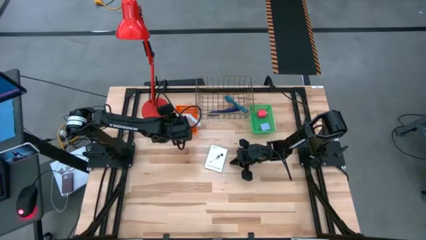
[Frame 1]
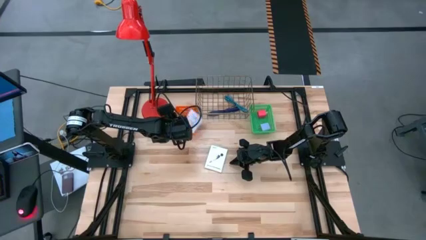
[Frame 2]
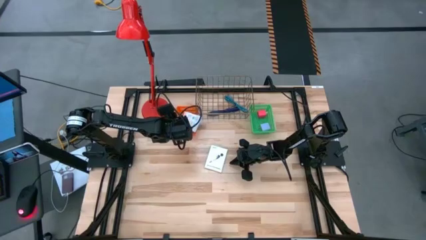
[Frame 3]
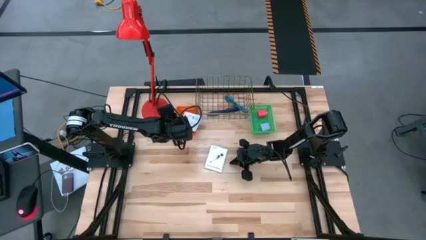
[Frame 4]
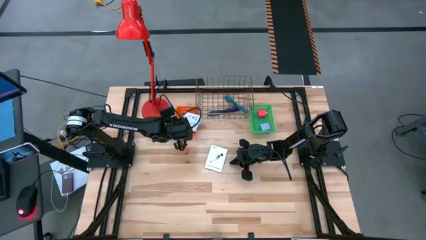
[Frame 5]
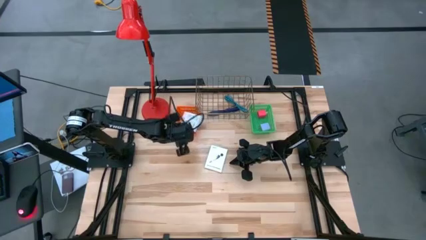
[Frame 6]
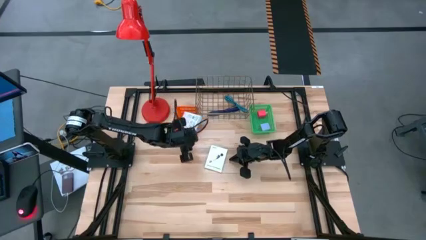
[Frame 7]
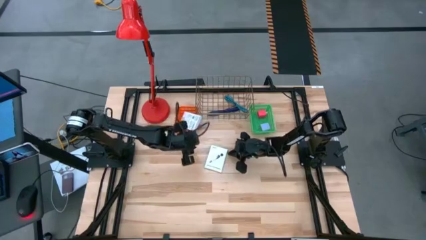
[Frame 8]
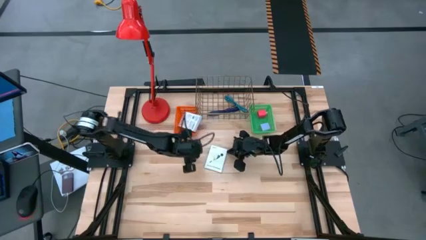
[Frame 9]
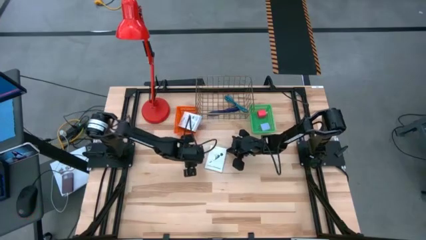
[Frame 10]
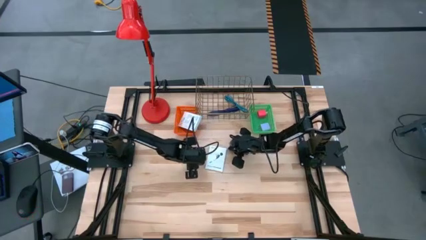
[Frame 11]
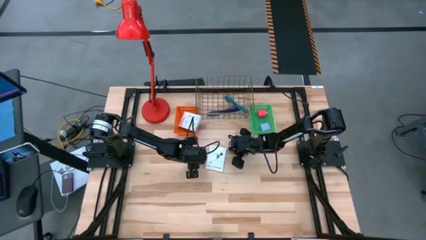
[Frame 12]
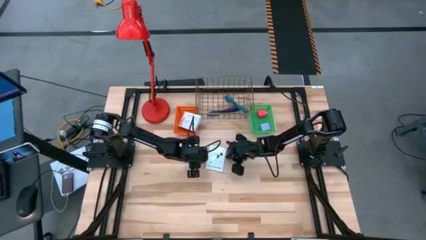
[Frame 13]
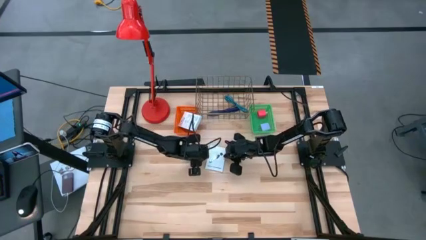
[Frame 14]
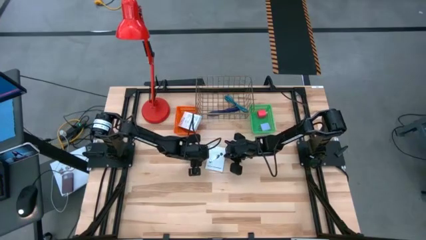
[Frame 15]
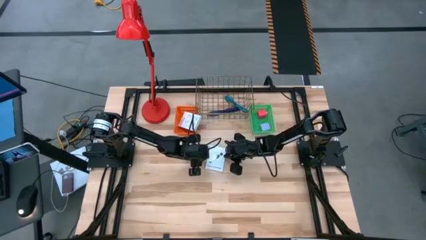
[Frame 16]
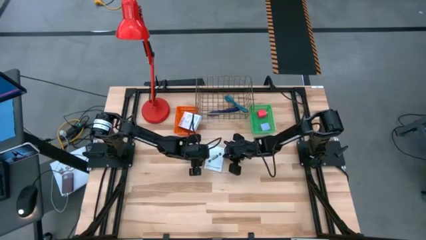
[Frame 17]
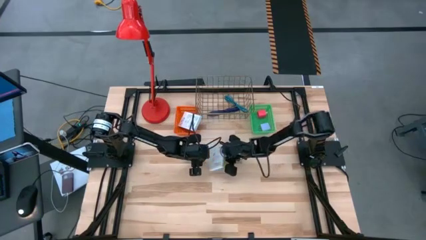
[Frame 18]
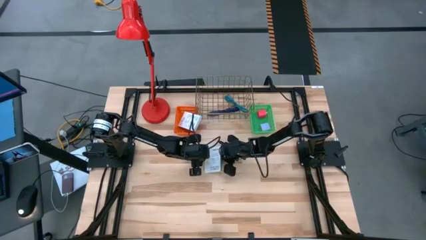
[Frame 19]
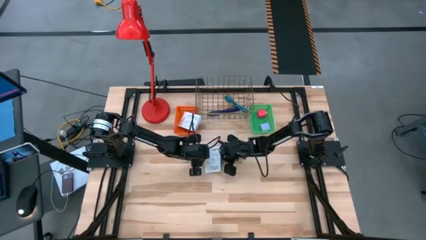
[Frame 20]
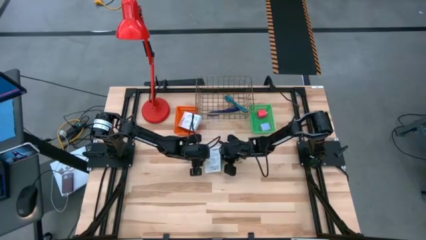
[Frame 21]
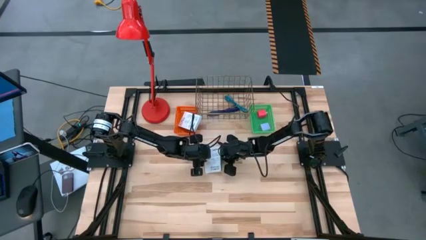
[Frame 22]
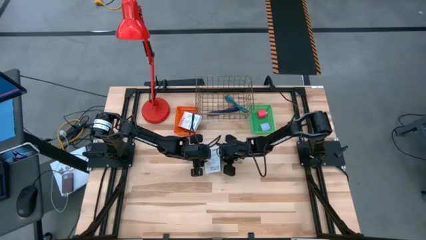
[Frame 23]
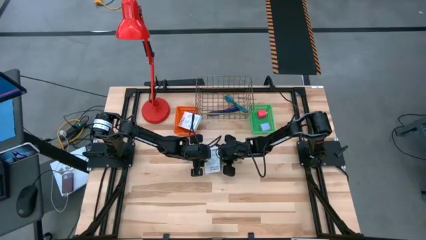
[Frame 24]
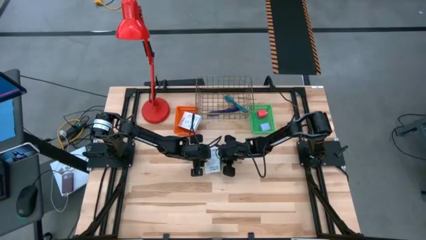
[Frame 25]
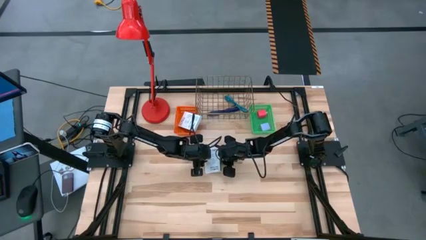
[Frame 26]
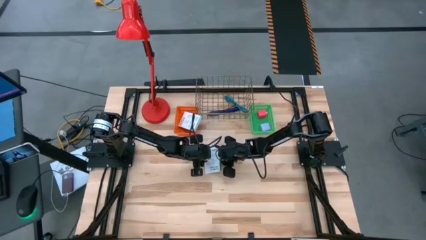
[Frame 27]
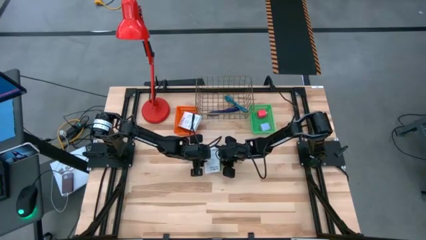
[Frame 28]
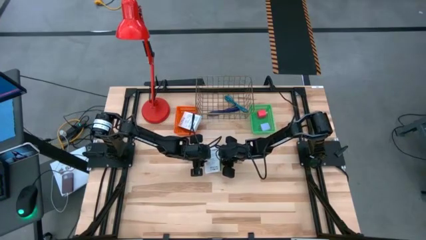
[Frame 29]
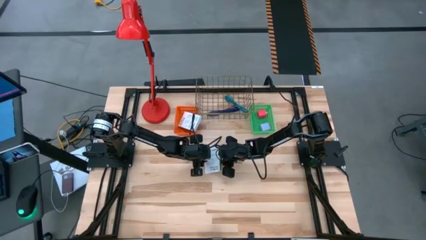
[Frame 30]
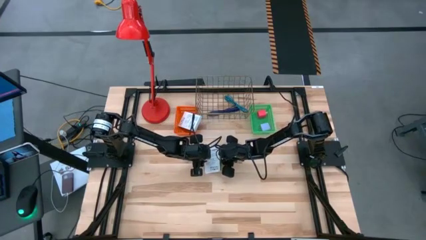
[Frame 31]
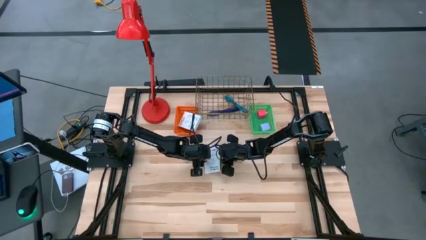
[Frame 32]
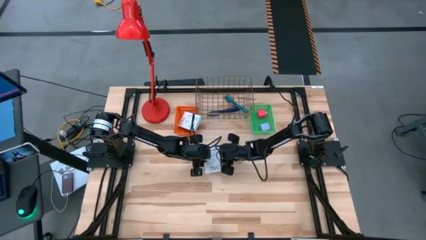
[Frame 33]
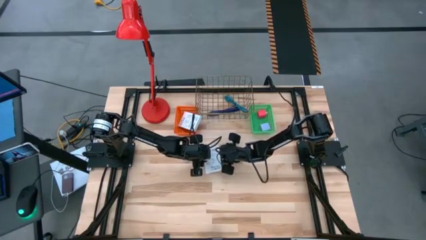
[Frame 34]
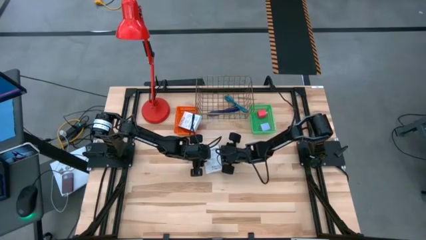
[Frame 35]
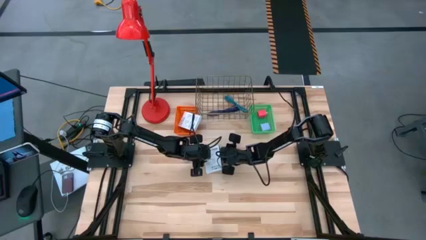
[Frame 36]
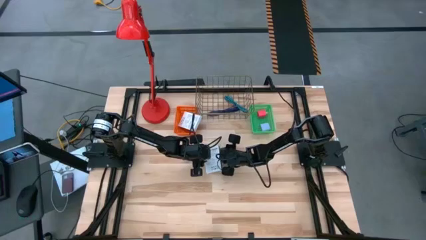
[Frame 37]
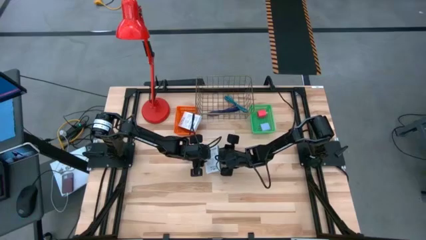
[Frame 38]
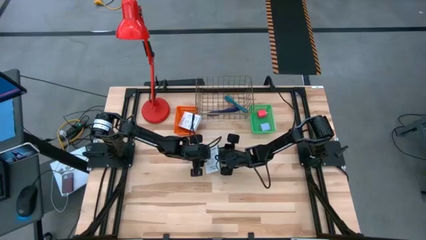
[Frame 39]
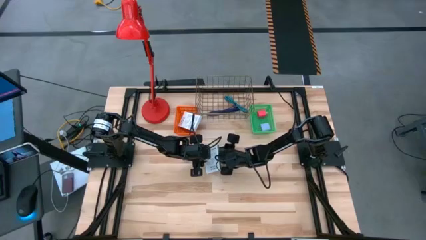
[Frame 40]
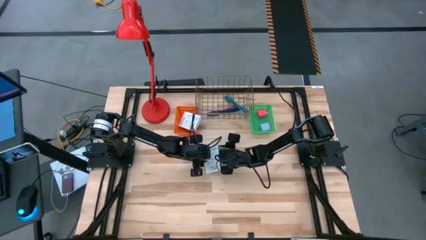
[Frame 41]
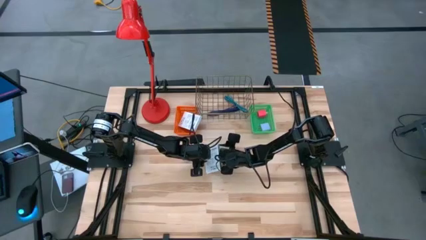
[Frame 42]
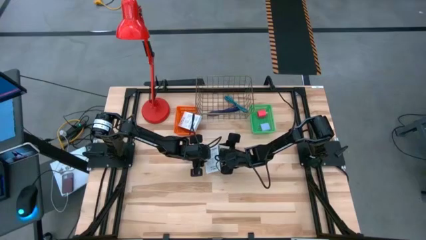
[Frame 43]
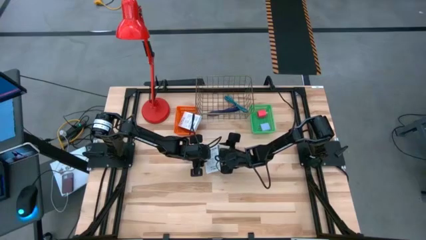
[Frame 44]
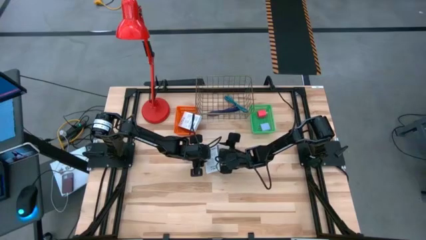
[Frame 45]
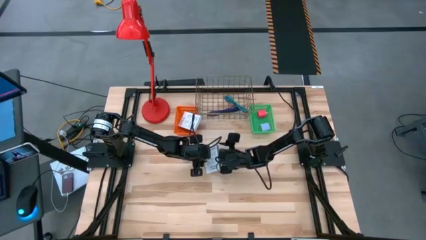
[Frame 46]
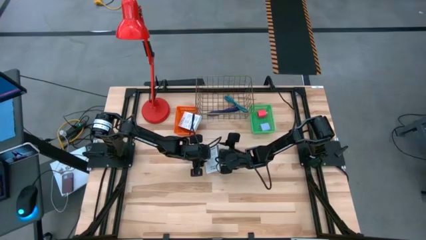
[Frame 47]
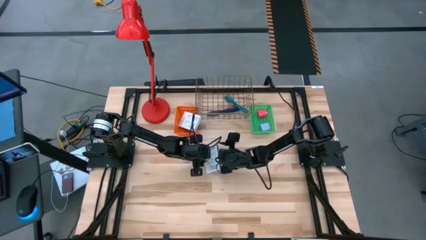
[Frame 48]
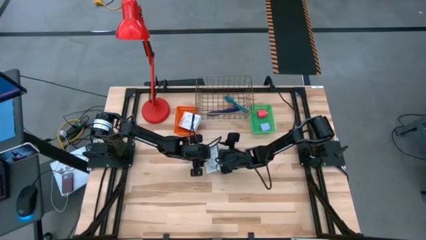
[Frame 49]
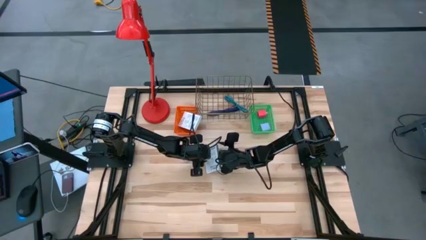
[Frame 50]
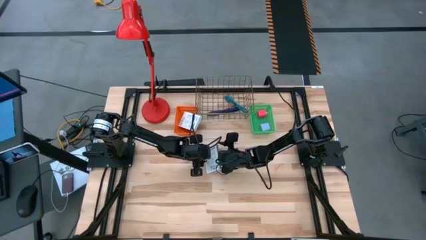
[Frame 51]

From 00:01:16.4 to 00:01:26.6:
Task: Pick and place items into bin
Put the card reader box into the orange bin
